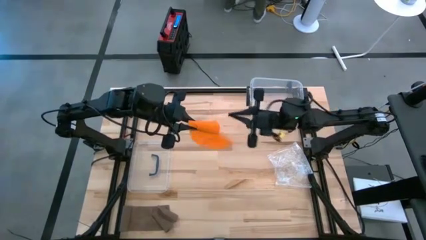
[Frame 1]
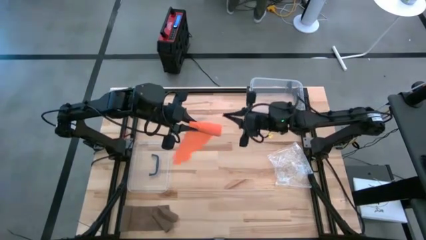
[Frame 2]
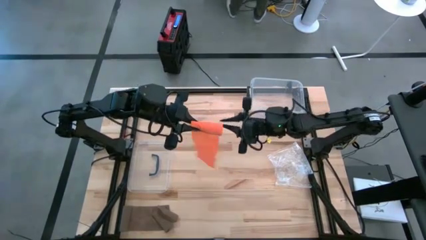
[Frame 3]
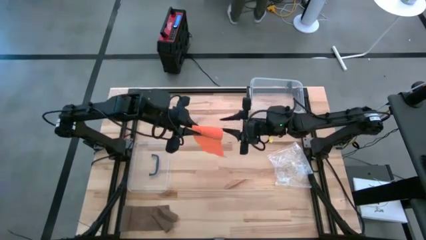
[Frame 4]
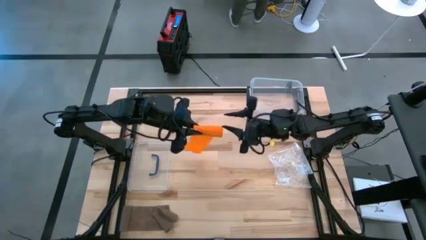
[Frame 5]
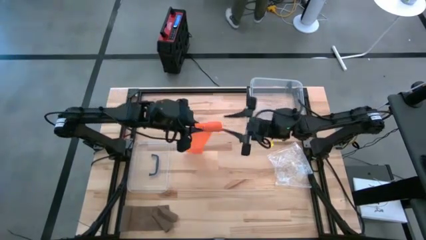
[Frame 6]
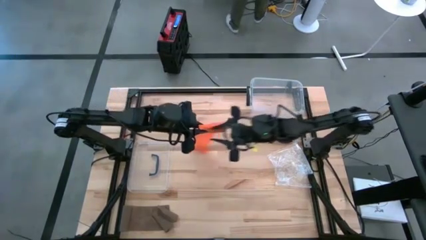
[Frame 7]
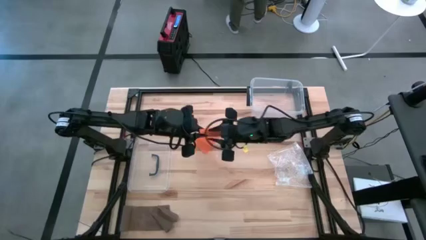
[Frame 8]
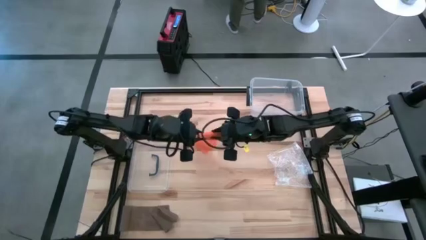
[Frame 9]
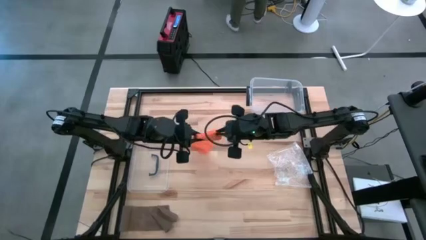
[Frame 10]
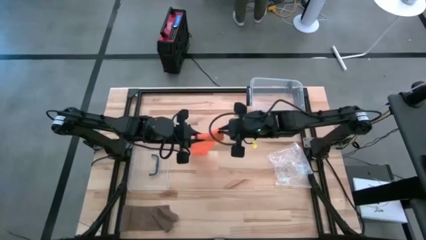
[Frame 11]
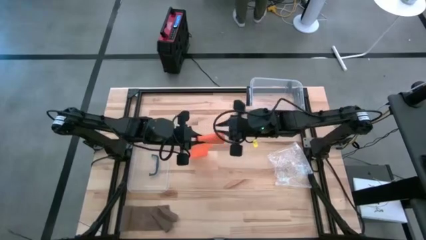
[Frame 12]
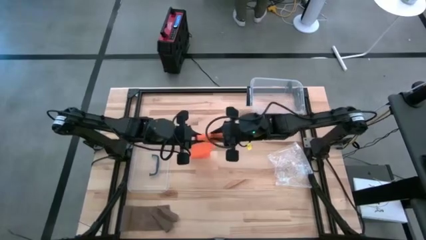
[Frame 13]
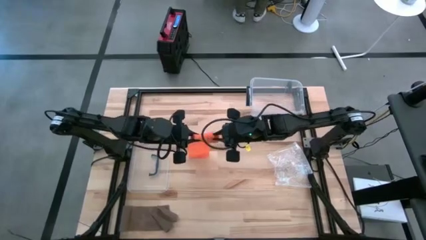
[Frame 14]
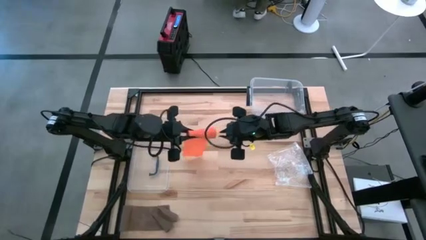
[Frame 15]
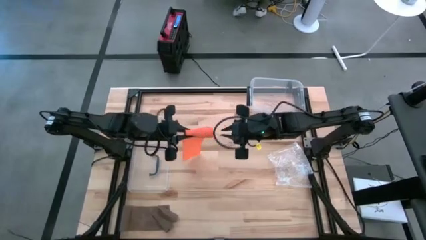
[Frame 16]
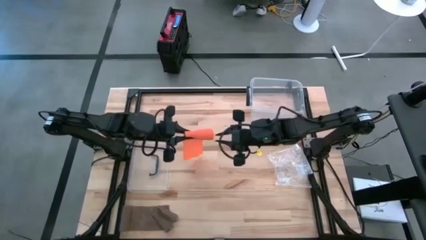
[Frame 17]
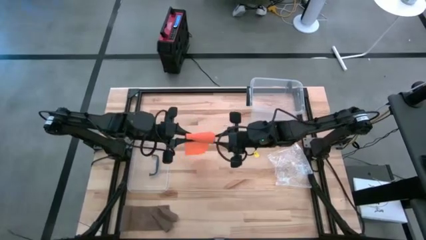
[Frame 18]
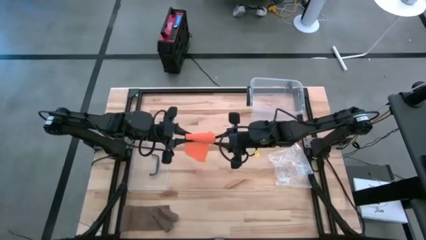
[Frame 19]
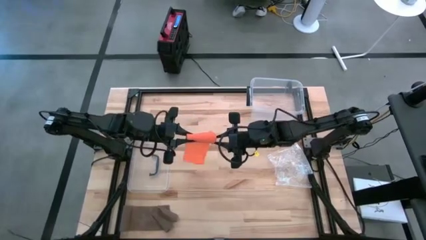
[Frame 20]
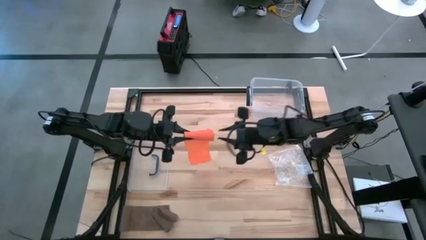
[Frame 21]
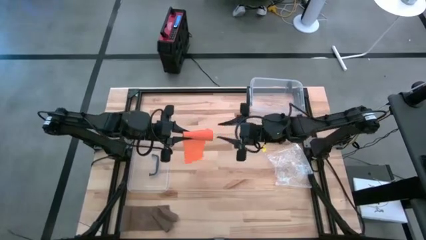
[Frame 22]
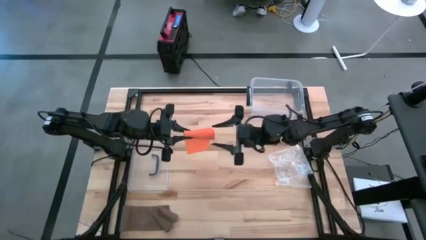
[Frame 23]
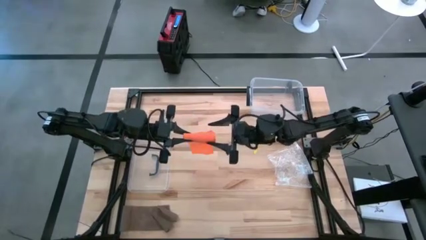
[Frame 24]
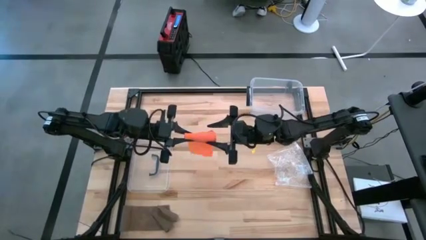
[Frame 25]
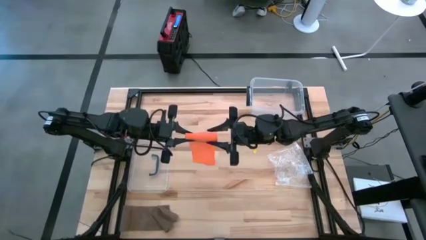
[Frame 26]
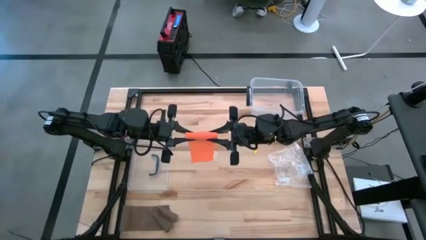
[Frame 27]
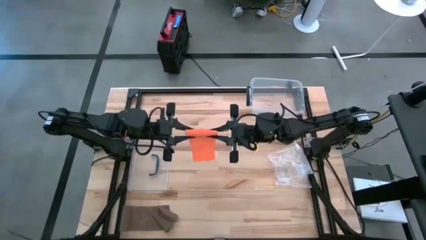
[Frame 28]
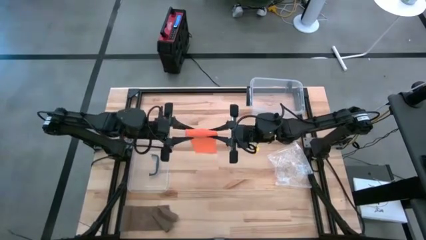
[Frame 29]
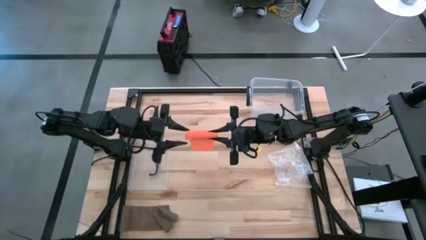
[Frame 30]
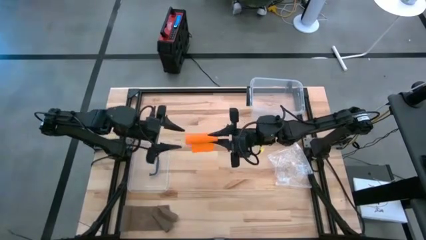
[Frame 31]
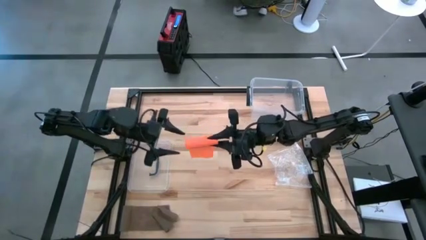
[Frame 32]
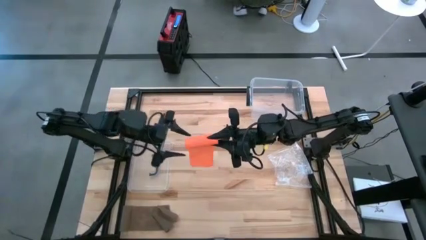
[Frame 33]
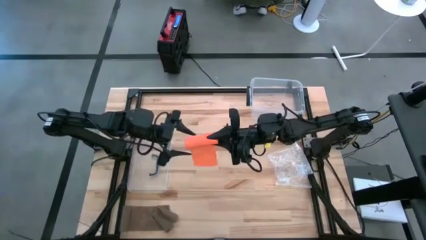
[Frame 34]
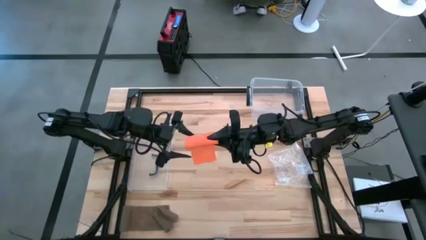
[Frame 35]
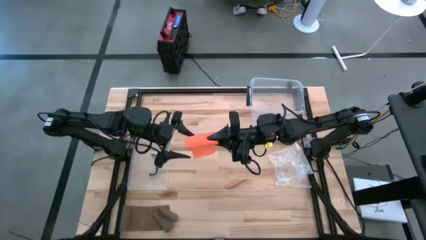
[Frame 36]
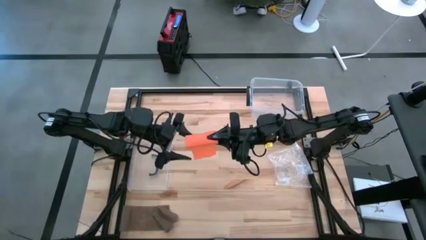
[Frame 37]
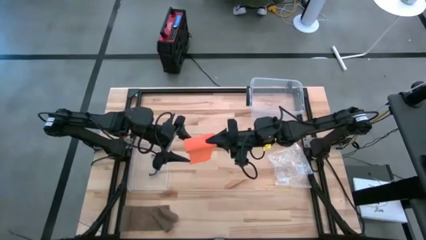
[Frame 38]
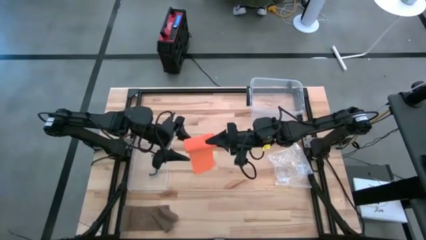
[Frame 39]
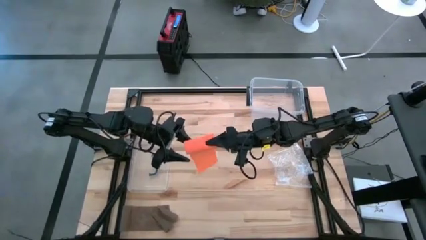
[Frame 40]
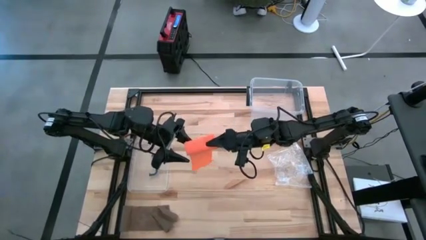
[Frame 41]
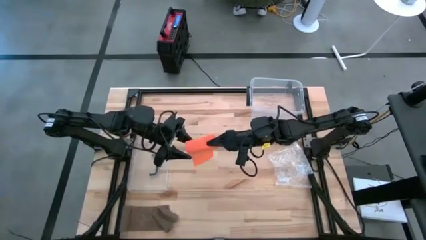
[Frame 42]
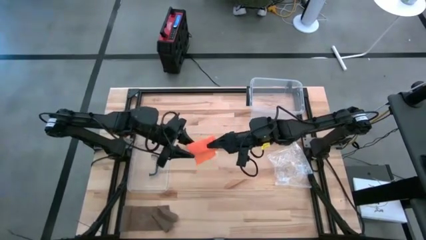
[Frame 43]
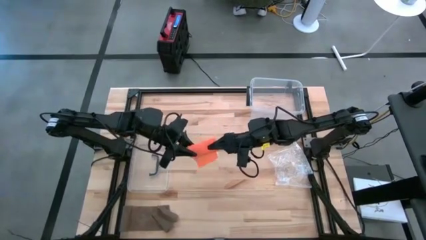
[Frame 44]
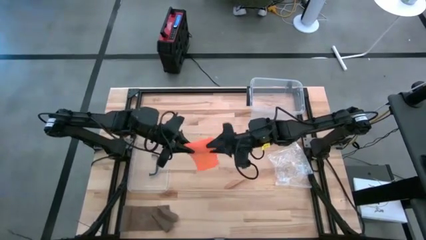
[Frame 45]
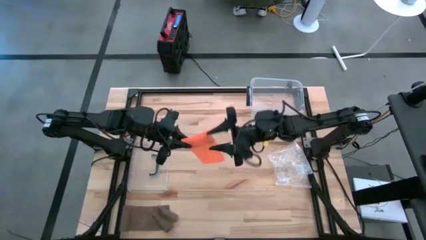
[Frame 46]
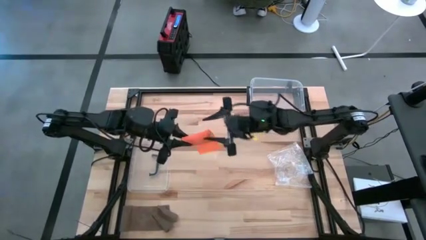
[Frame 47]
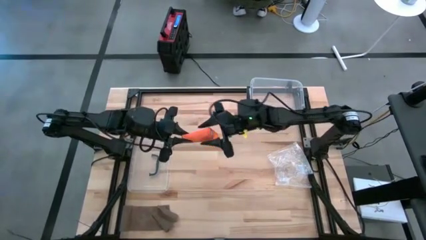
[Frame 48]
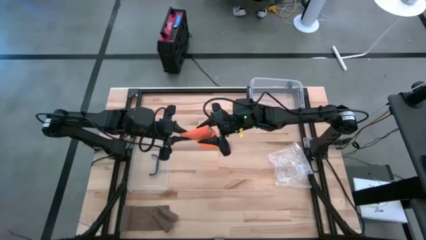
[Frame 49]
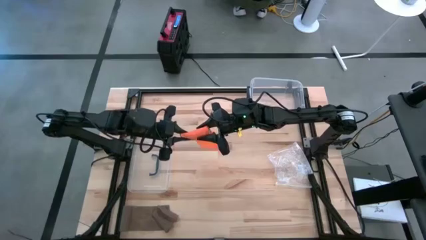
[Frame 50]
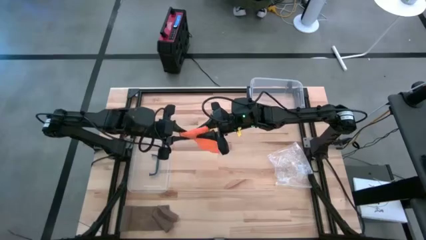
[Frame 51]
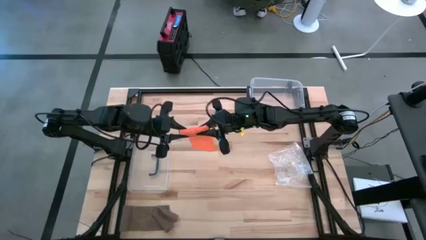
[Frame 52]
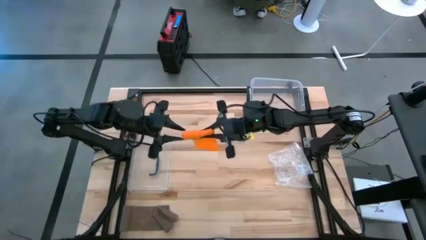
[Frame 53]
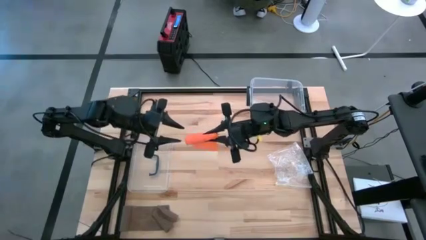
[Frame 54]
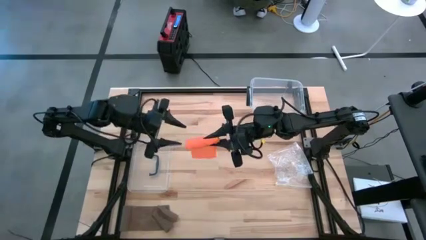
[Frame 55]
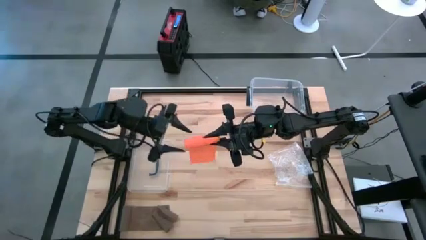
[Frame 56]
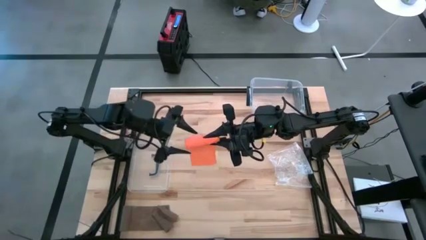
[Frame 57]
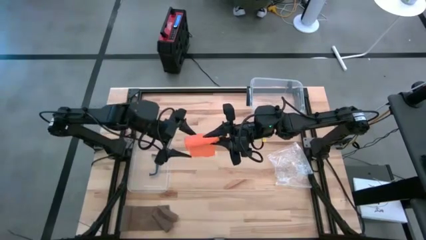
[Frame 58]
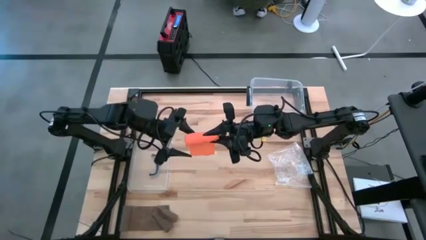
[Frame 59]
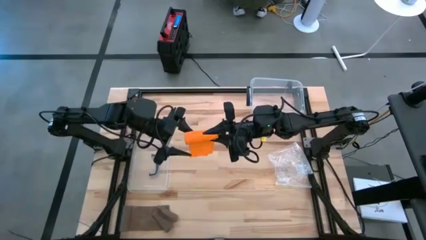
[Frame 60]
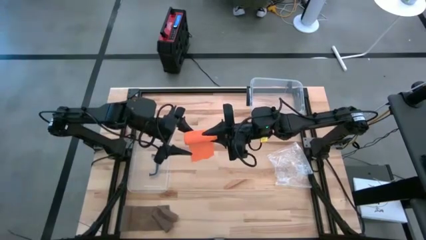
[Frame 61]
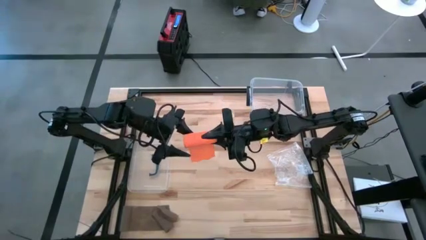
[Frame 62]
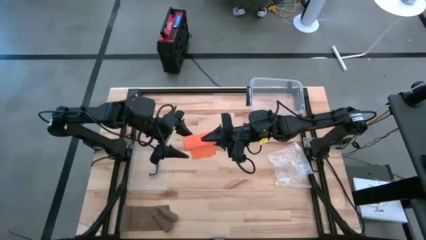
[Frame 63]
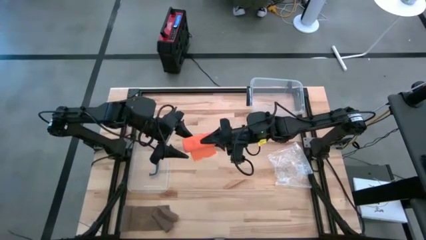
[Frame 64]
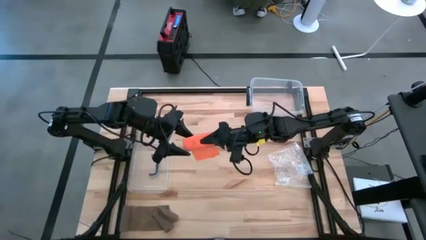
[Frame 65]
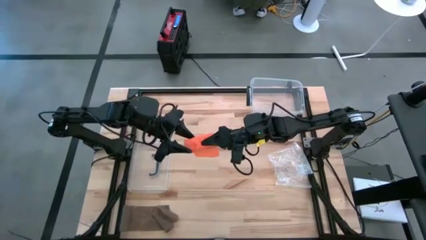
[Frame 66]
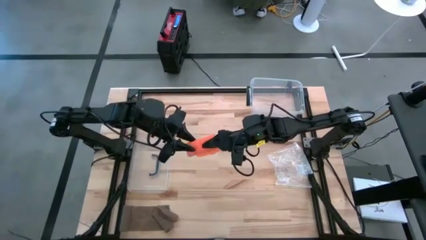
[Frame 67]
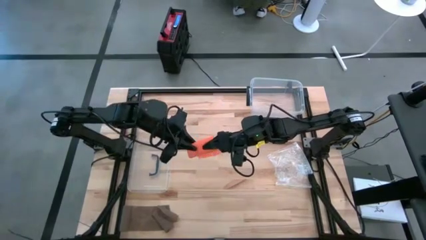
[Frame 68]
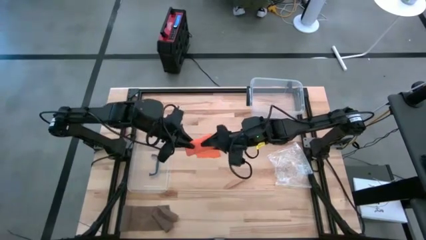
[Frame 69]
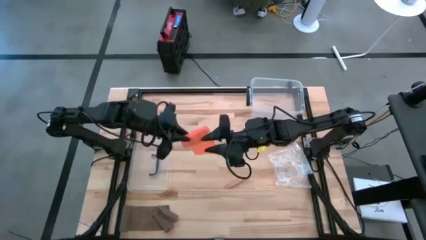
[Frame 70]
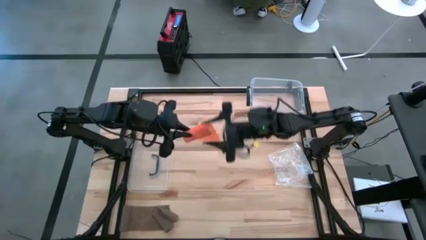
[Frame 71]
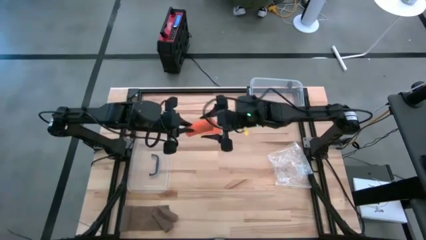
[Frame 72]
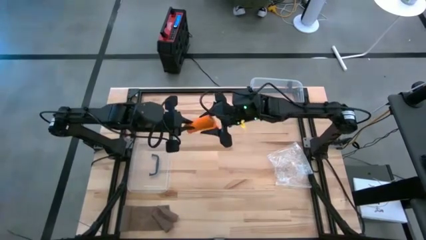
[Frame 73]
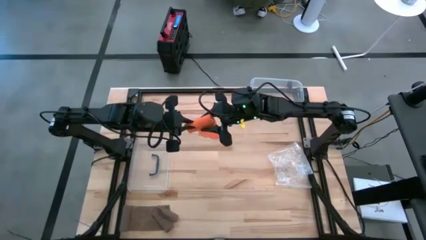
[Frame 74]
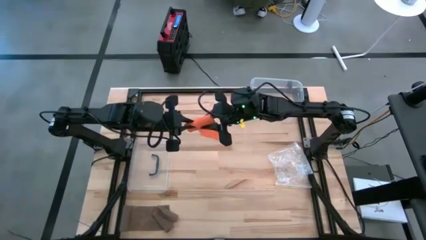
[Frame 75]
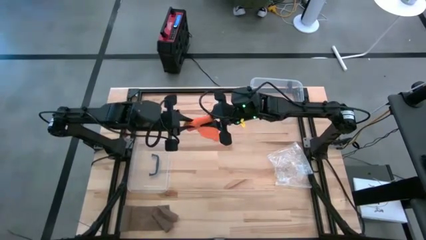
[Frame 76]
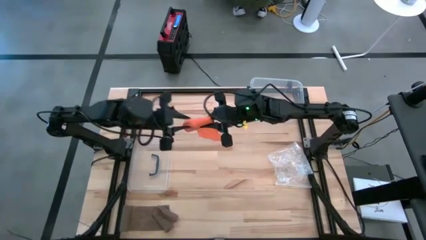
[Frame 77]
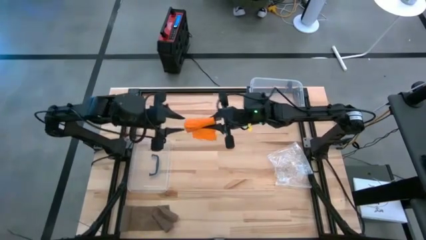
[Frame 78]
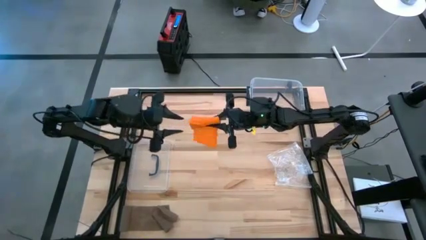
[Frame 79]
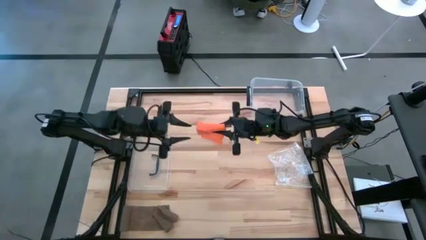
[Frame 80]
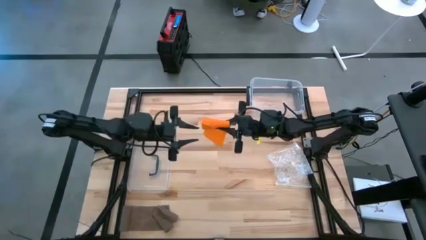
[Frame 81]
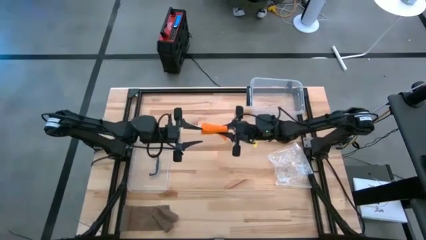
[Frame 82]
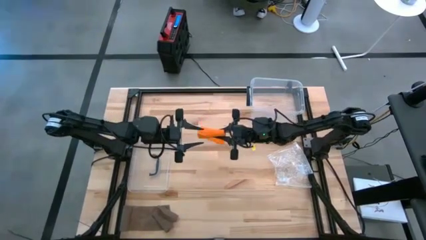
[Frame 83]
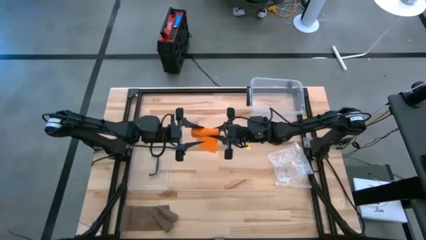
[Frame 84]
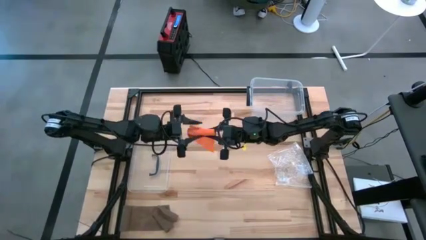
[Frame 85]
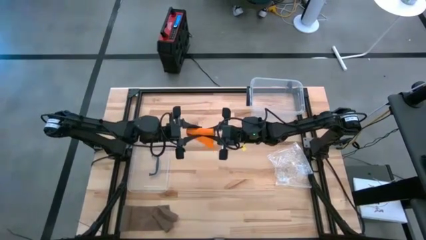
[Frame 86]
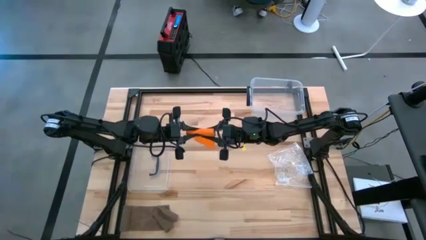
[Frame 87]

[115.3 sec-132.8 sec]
Task: Roll bandage
Roll the orange bandage
